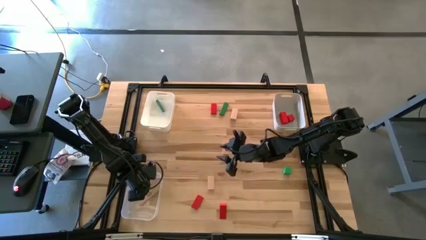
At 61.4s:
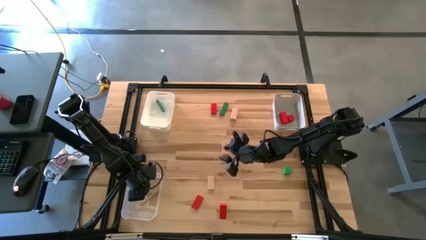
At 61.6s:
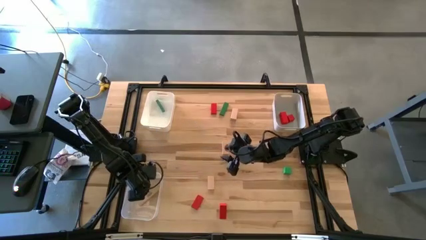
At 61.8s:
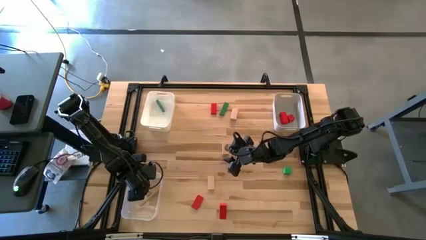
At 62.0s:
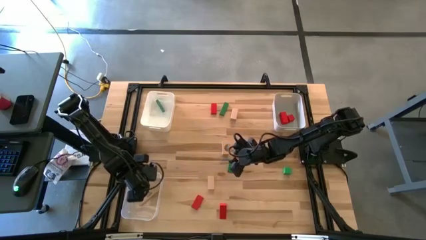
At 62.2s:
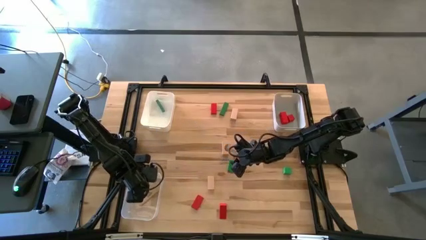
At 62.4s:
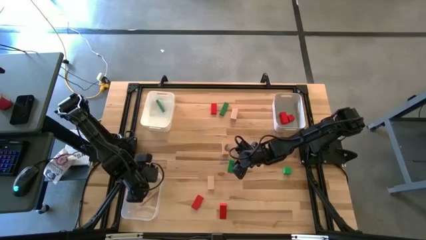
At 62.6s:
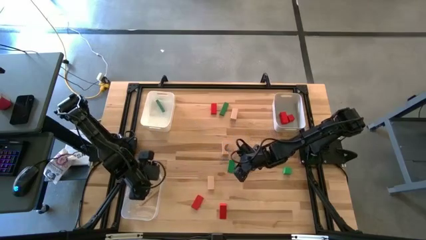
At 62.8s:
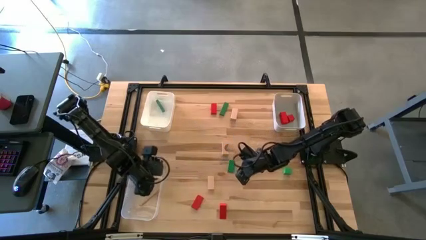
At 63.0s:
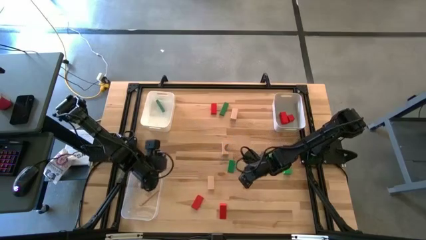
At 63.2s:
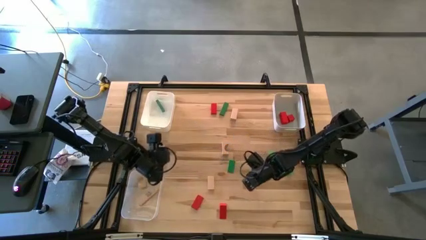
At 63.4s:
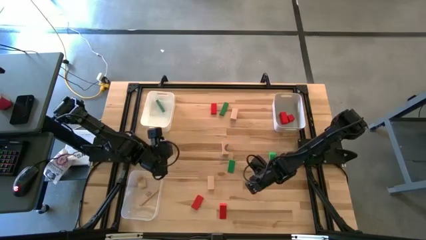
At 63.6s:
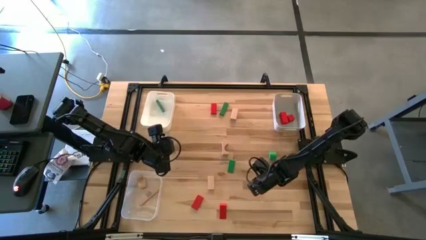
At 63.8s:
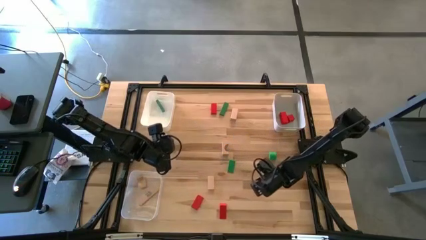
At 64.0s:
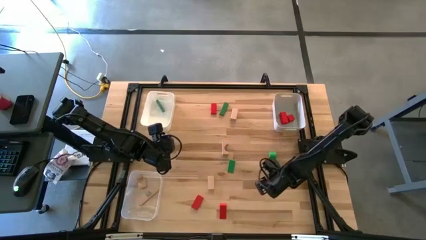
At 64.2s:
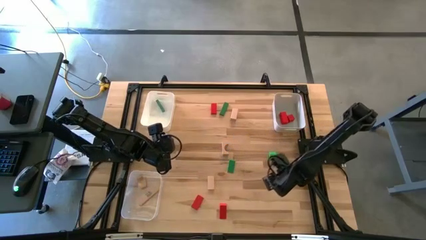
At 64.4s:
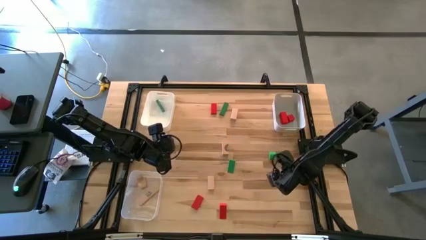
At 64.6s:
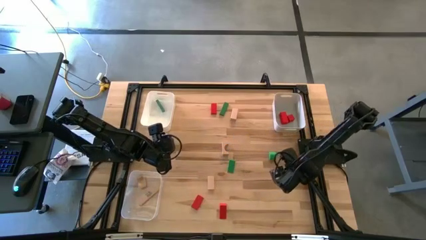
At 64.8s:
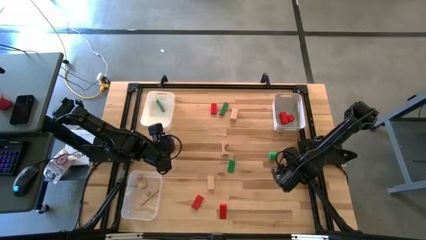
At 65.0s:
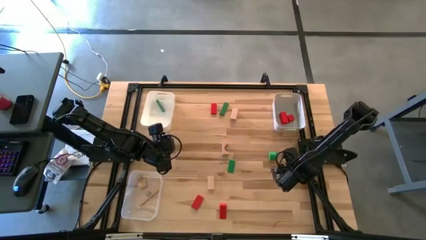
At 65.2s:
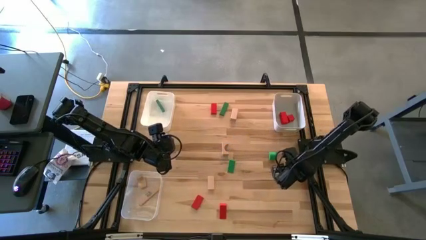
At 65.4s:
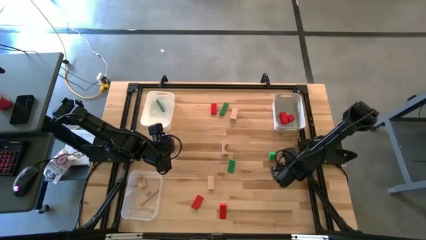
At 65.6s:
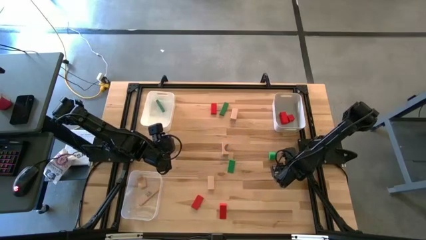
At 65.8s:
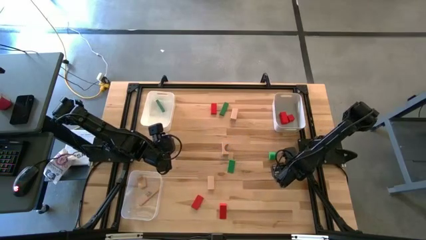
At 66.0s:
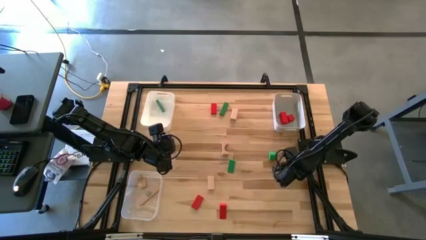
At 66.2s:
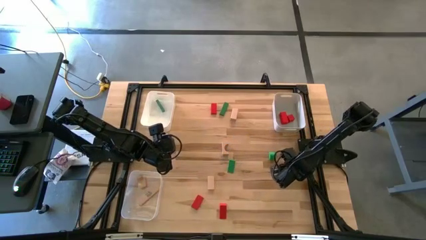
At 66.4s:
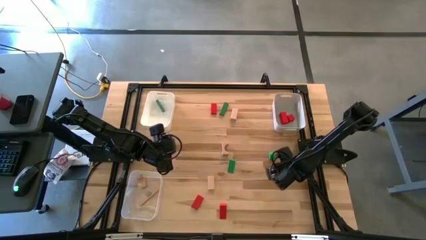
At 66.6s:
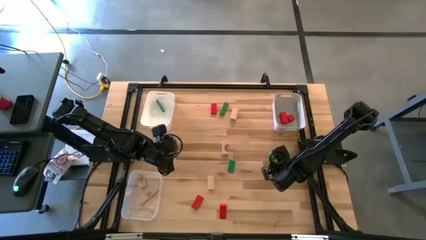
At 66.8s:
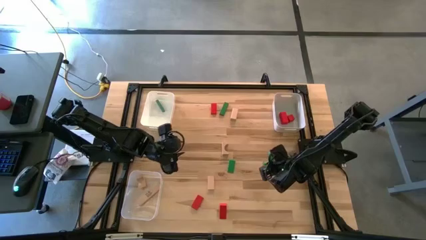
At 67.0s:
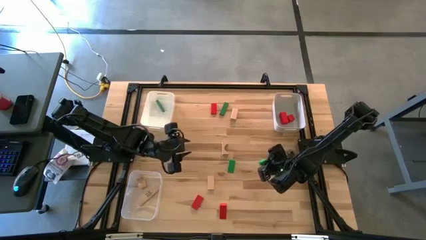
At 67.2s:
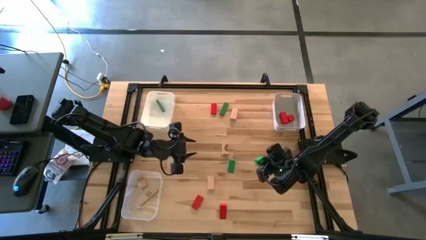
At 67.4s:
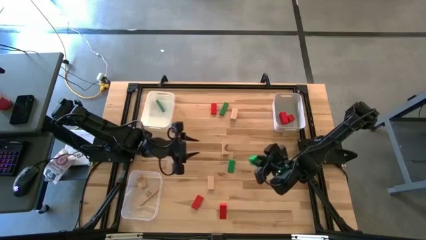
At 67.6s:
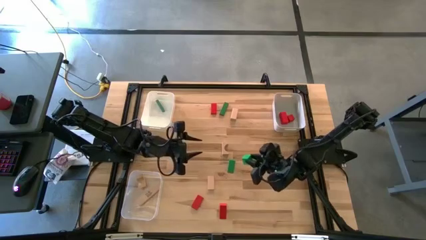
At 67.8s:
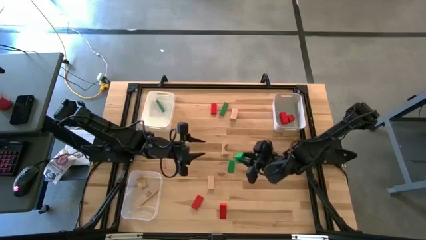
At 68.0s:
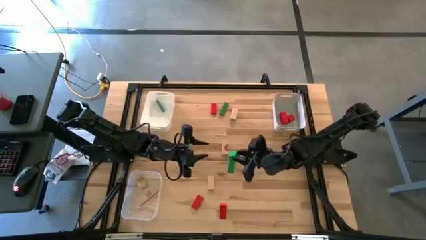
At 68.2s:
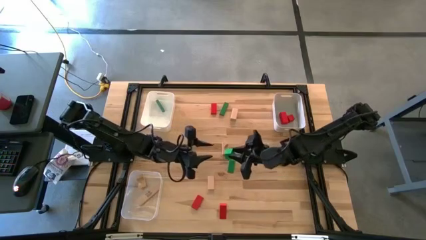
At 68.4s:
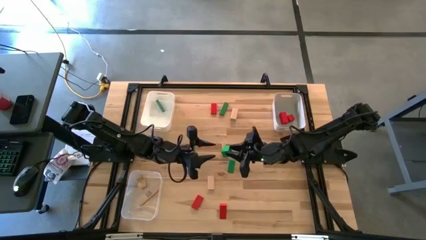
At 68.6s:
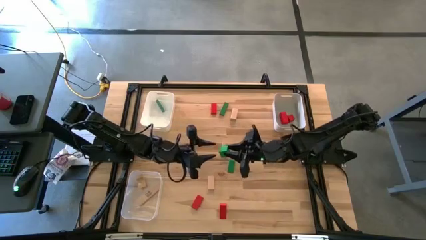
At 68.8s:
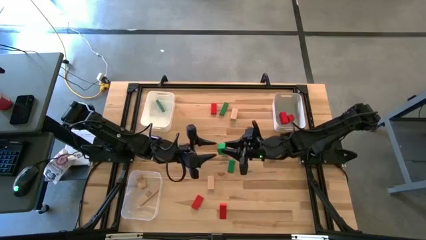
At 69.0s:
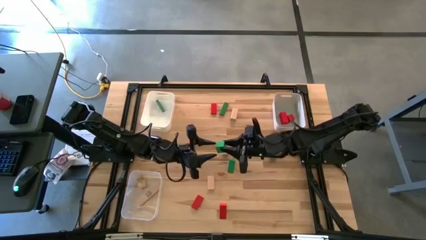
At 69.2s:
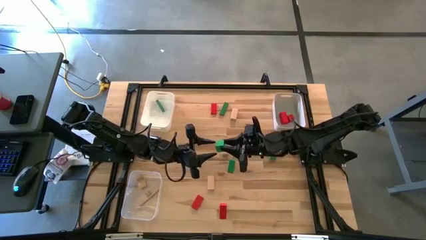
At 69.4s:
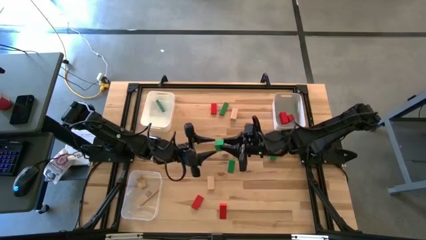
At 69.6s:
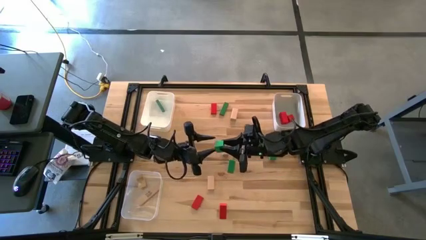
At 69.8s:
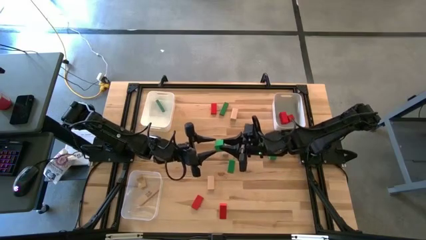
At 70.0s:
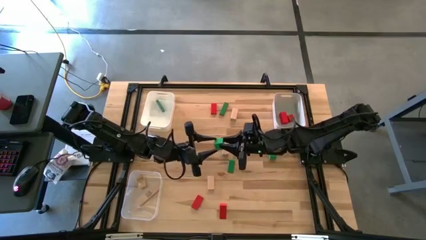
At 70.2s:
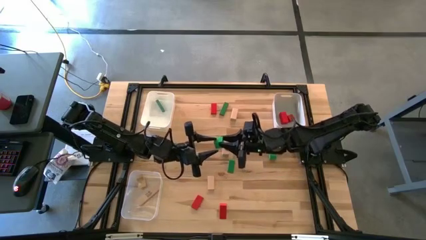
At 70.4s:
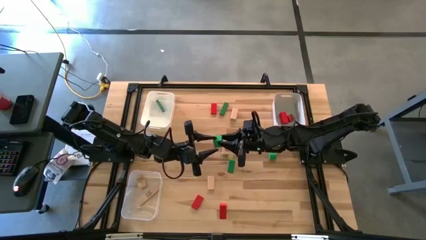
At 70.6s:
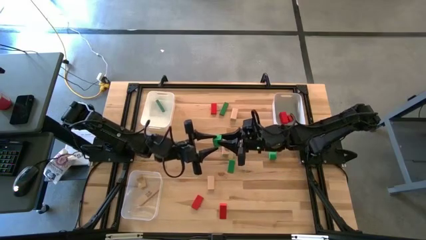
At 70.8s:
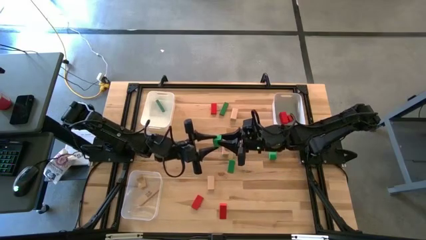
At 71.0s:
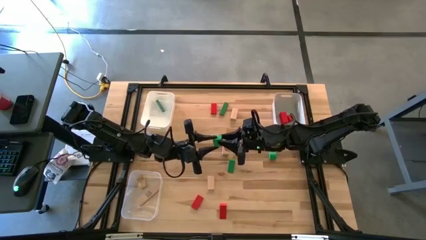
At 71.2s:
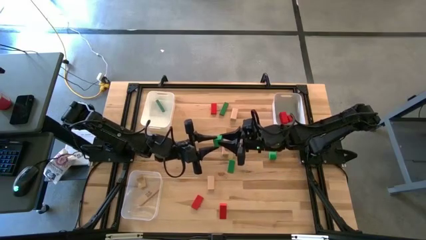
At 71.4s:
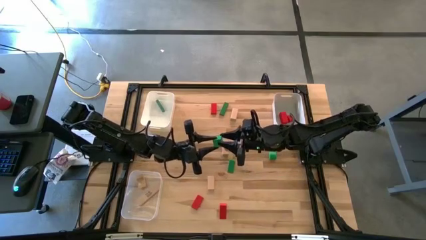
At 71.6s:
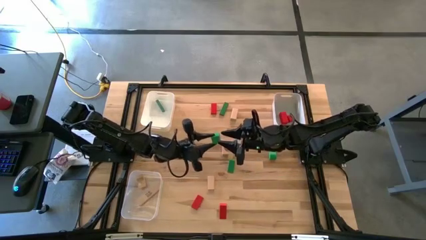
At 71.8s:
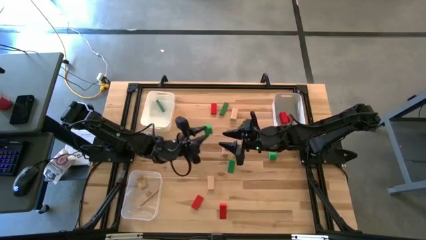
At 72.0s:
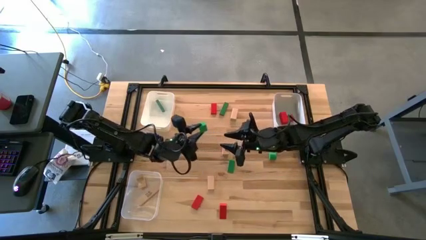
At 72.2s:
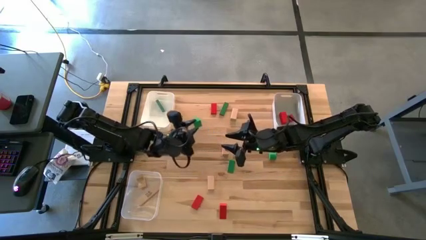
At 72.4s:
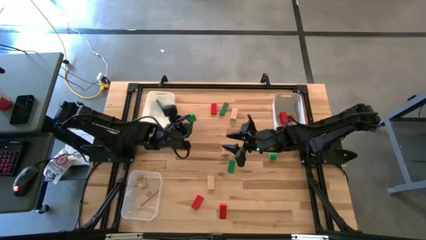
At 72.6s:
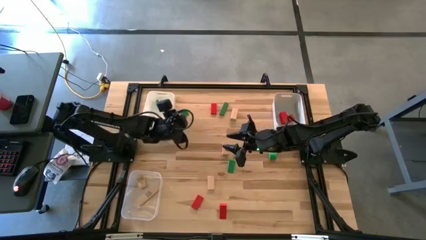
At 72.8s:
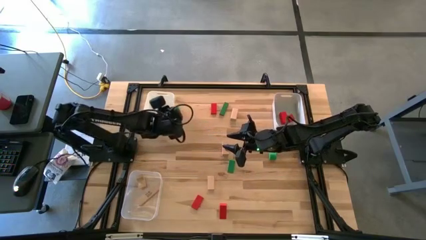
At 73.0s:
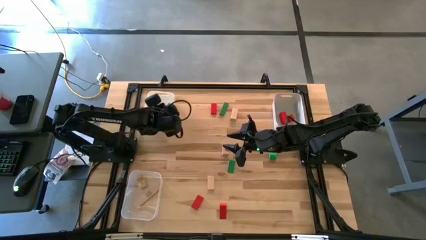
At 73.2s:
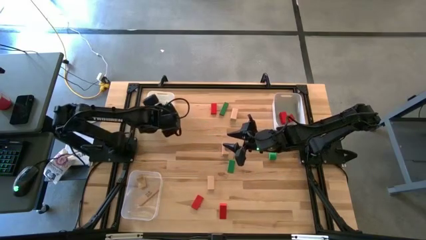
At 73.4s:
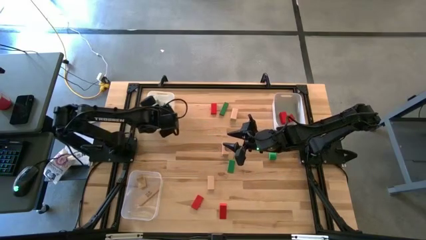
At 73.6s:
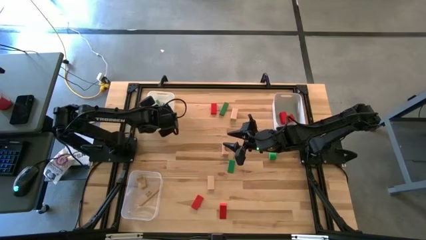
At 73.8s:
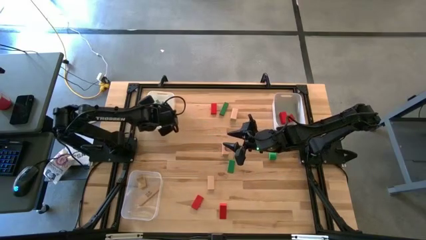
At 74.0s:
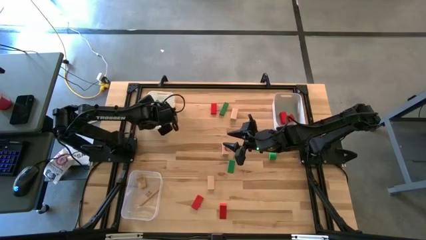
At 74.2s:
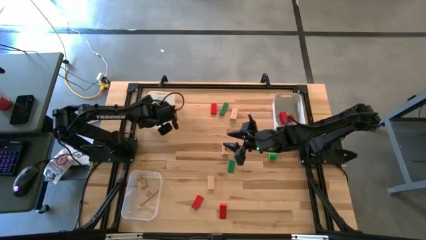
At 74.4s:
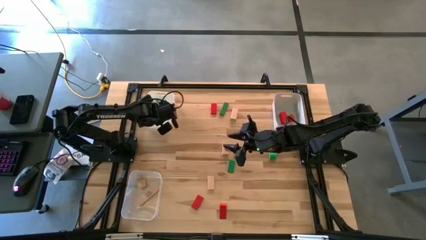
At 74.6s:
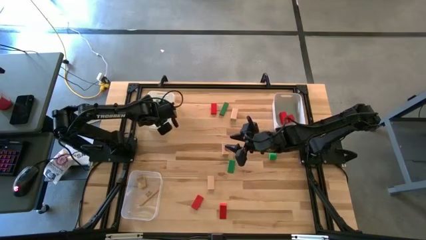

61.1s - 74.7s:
Task: Sort & place blocks by color
Put the green block into the white bin
